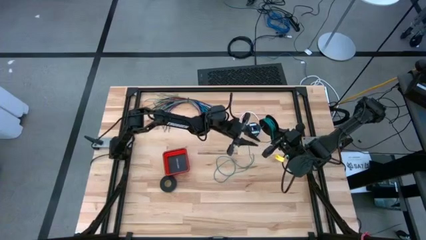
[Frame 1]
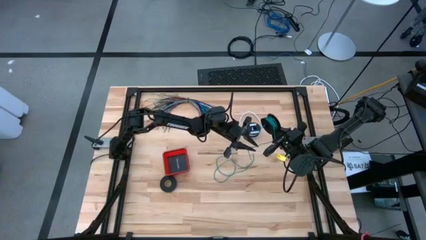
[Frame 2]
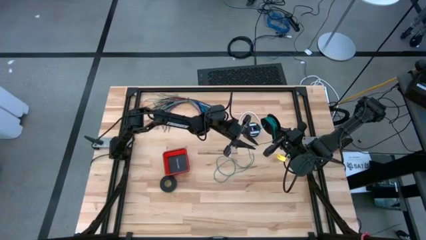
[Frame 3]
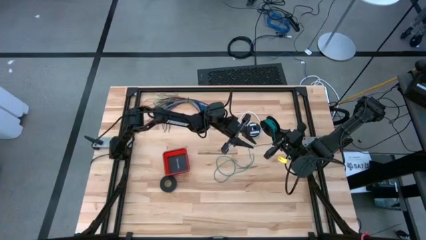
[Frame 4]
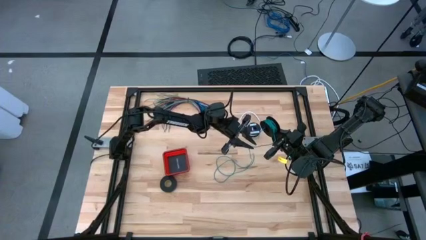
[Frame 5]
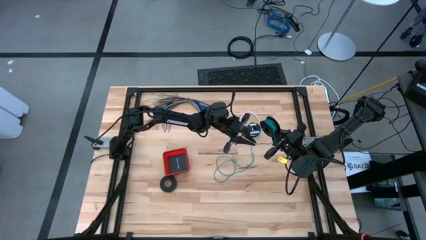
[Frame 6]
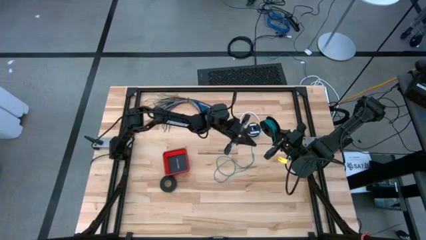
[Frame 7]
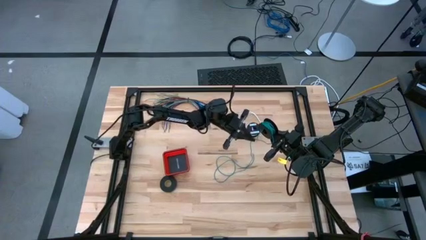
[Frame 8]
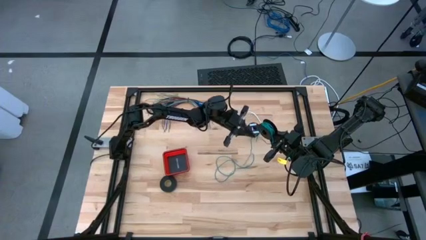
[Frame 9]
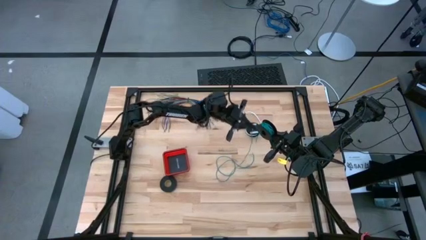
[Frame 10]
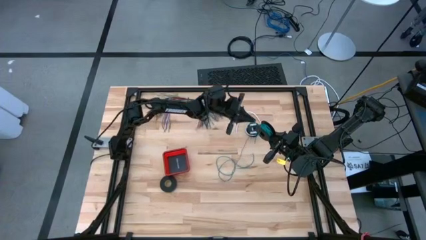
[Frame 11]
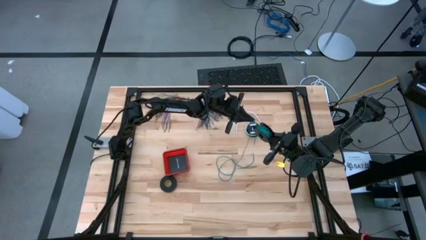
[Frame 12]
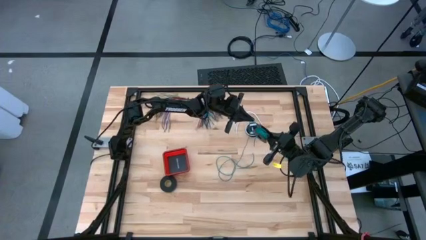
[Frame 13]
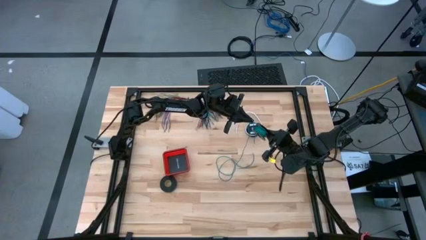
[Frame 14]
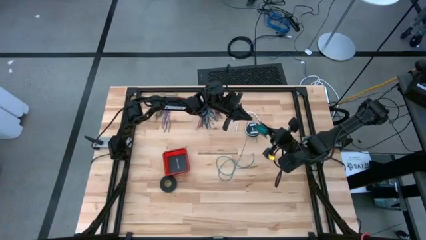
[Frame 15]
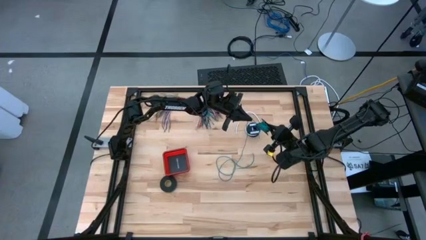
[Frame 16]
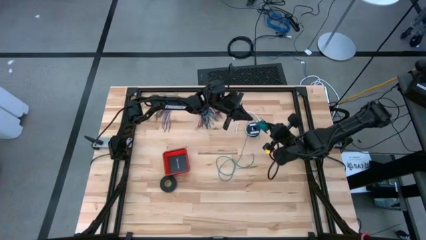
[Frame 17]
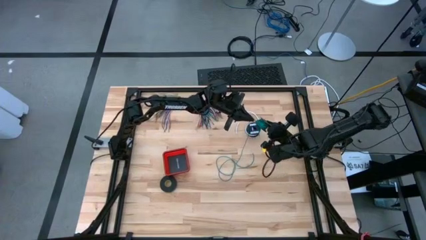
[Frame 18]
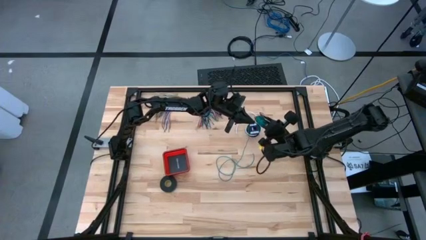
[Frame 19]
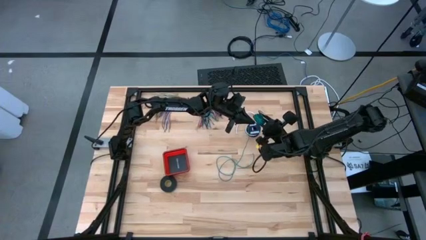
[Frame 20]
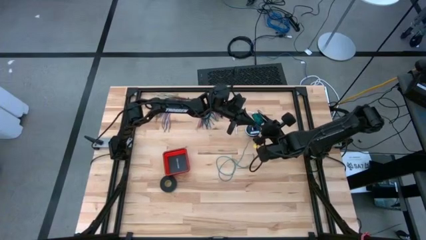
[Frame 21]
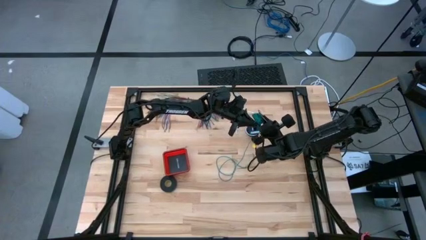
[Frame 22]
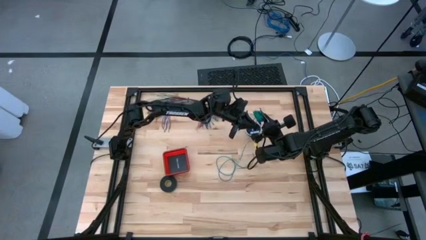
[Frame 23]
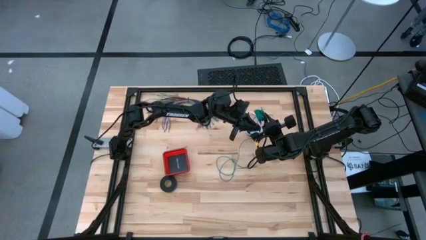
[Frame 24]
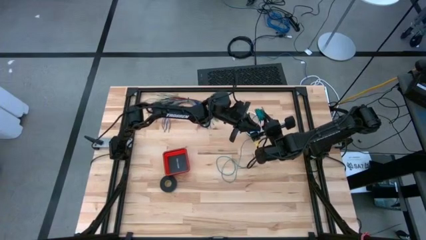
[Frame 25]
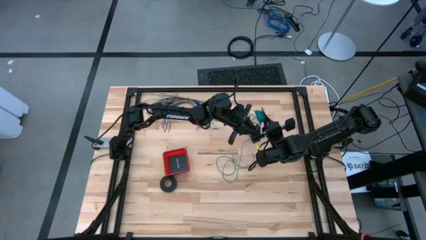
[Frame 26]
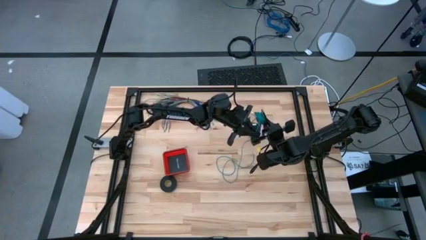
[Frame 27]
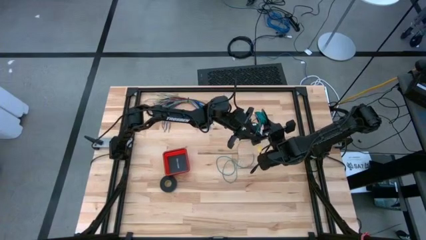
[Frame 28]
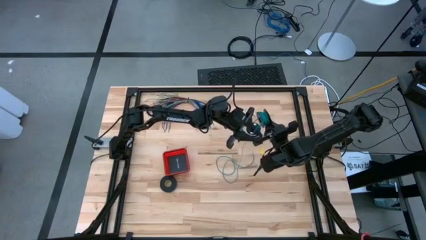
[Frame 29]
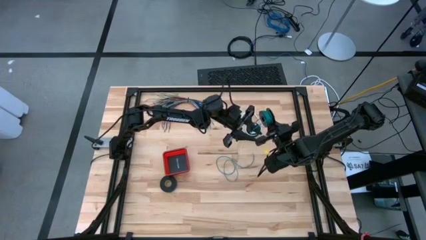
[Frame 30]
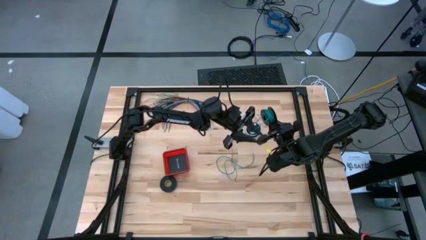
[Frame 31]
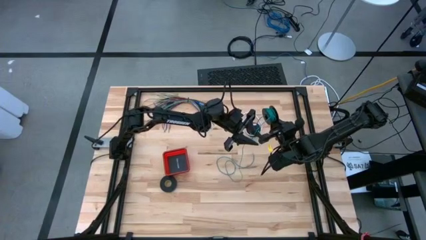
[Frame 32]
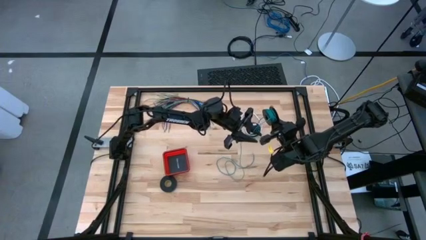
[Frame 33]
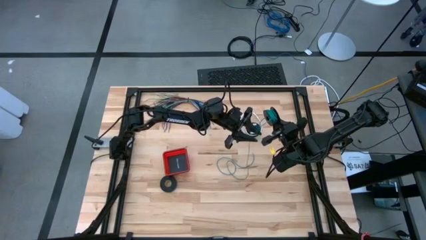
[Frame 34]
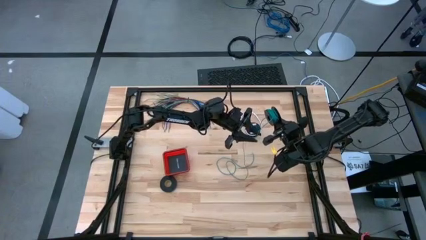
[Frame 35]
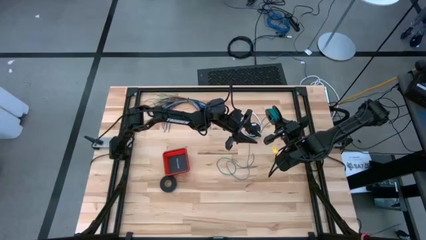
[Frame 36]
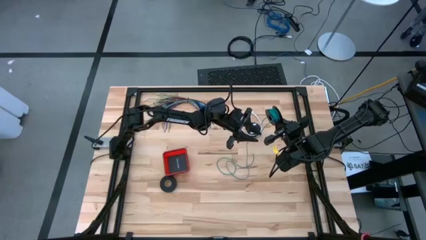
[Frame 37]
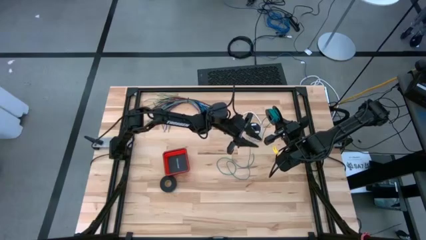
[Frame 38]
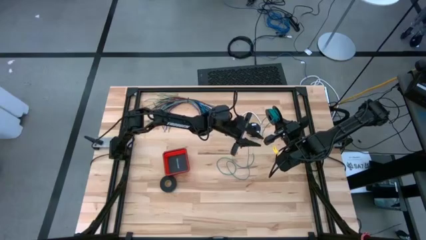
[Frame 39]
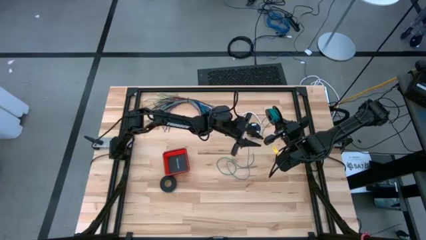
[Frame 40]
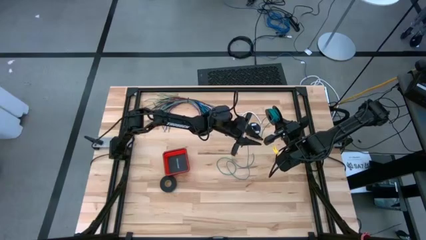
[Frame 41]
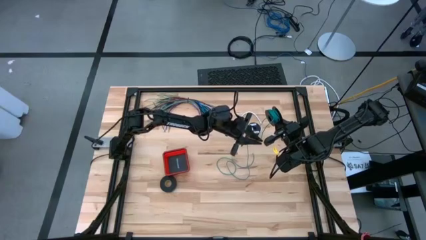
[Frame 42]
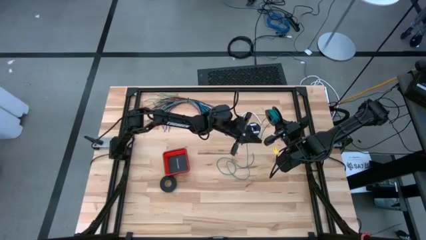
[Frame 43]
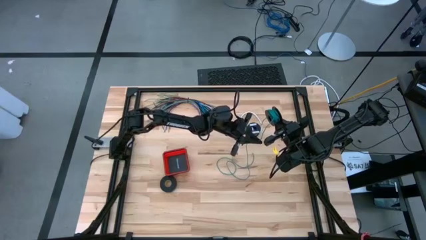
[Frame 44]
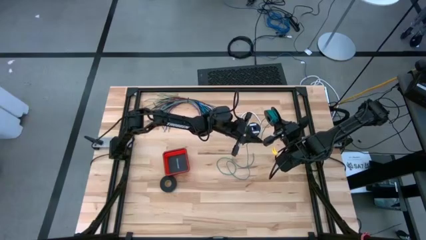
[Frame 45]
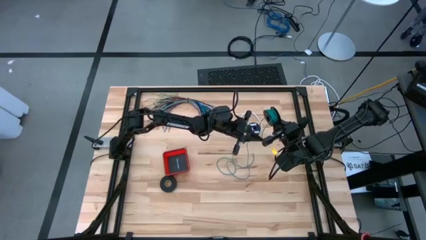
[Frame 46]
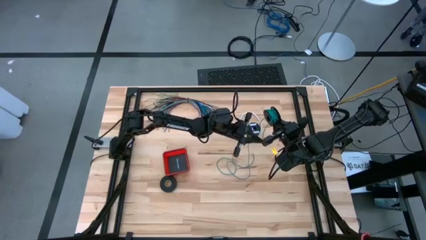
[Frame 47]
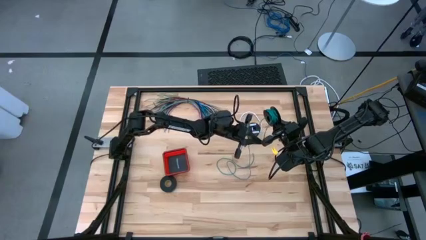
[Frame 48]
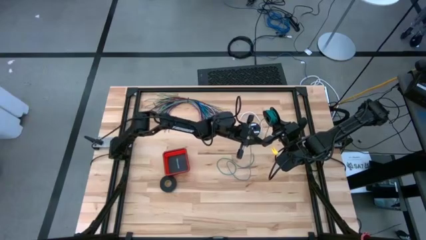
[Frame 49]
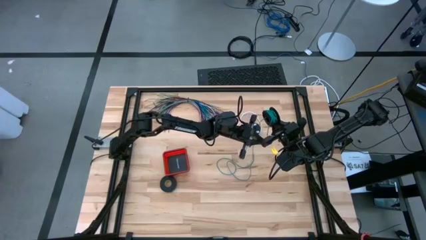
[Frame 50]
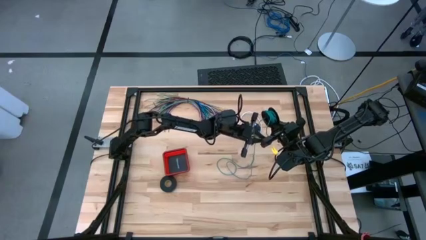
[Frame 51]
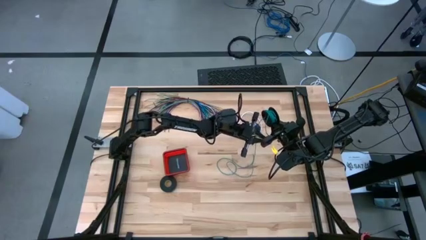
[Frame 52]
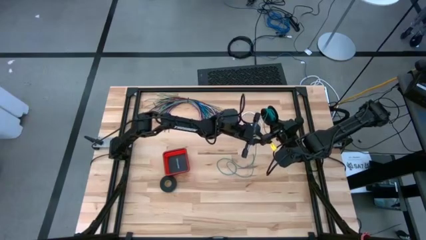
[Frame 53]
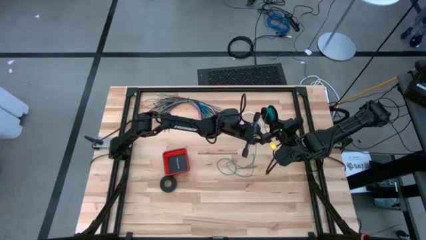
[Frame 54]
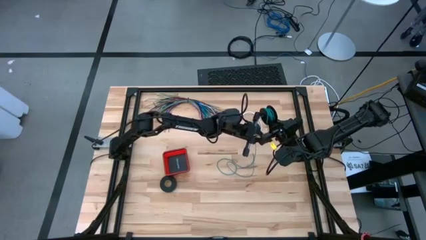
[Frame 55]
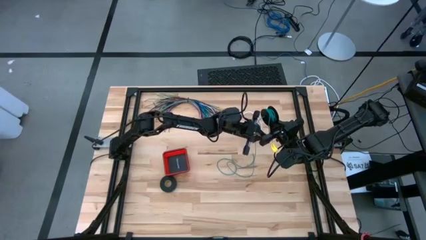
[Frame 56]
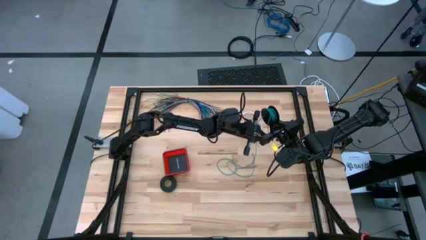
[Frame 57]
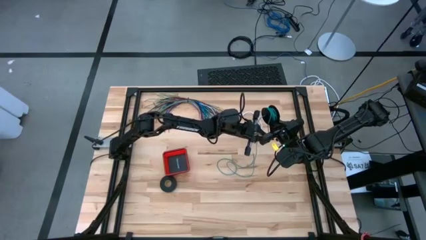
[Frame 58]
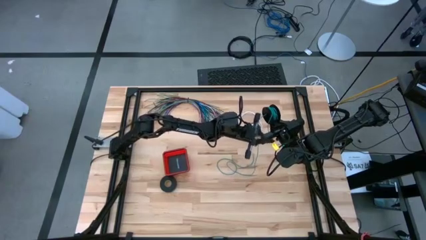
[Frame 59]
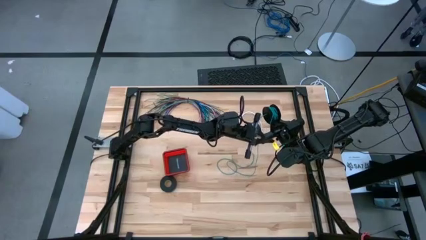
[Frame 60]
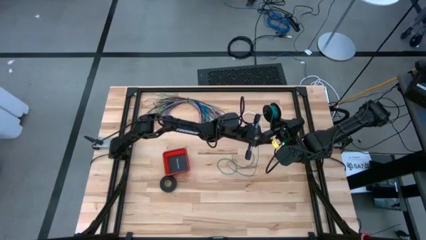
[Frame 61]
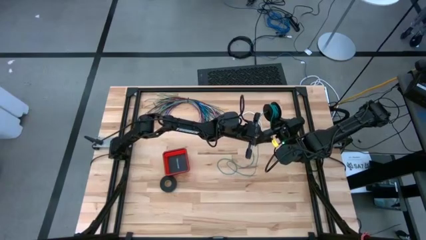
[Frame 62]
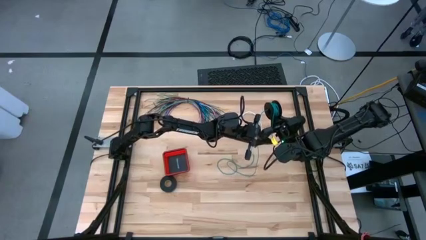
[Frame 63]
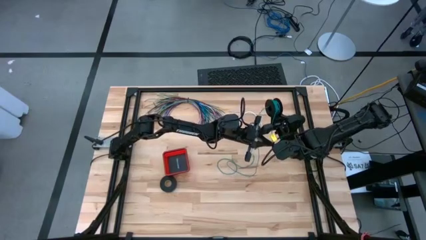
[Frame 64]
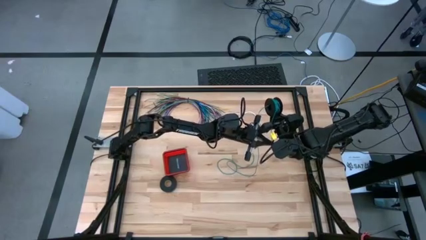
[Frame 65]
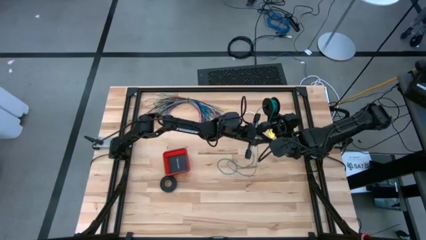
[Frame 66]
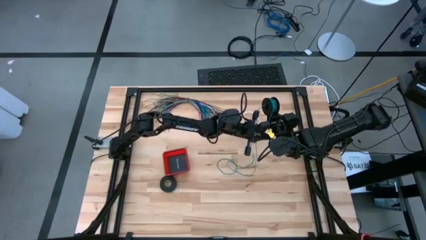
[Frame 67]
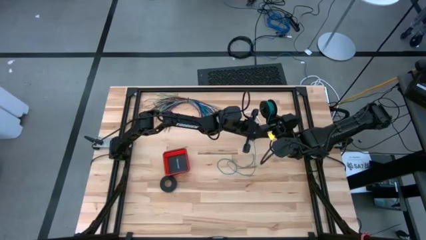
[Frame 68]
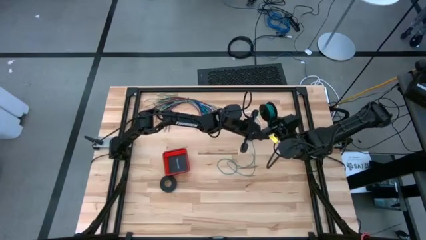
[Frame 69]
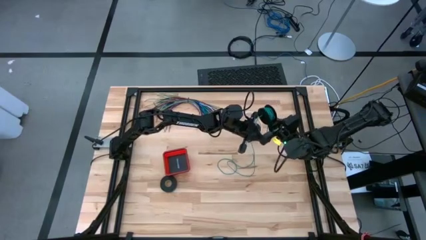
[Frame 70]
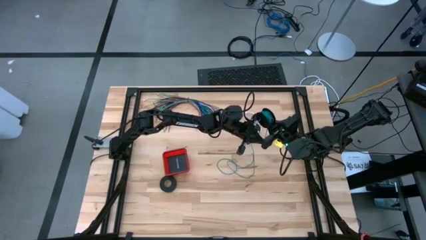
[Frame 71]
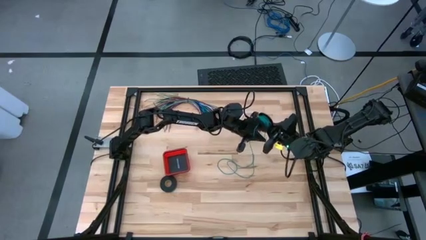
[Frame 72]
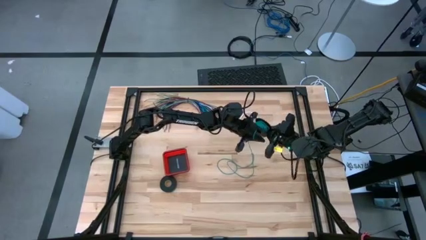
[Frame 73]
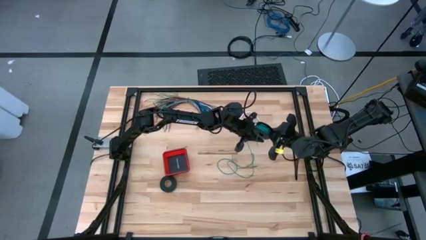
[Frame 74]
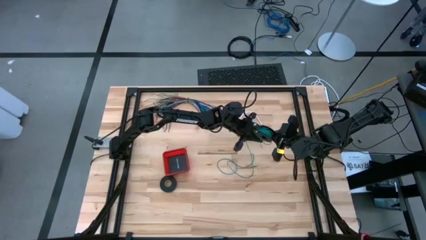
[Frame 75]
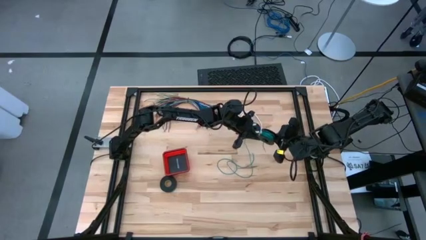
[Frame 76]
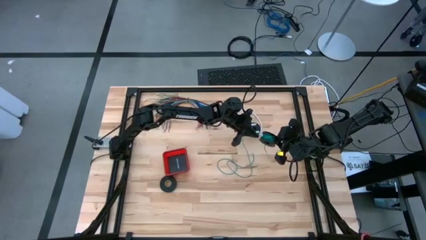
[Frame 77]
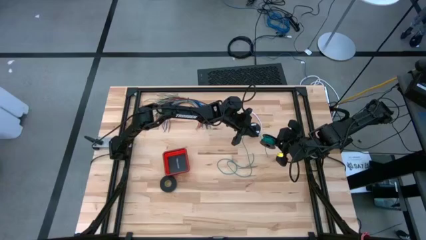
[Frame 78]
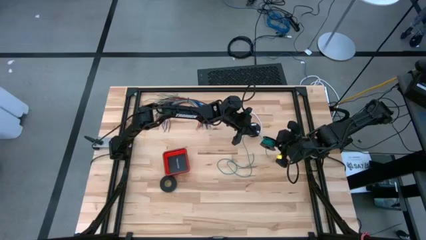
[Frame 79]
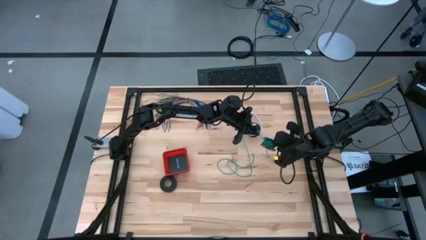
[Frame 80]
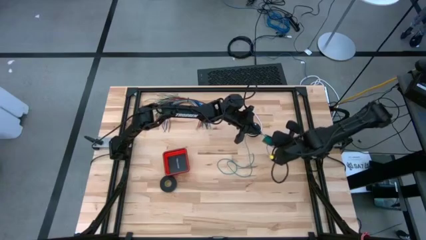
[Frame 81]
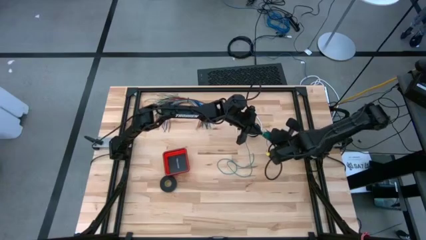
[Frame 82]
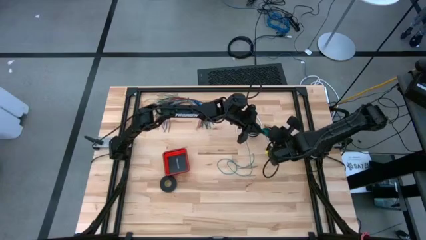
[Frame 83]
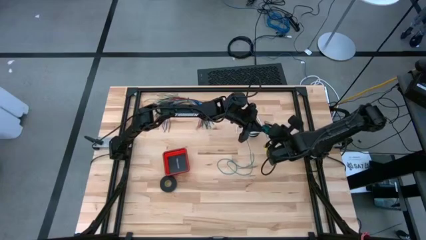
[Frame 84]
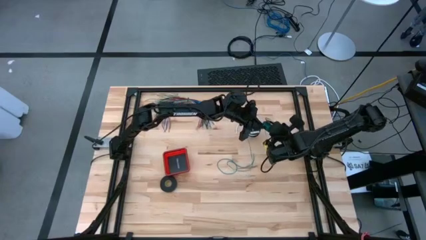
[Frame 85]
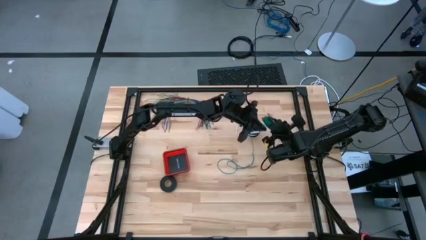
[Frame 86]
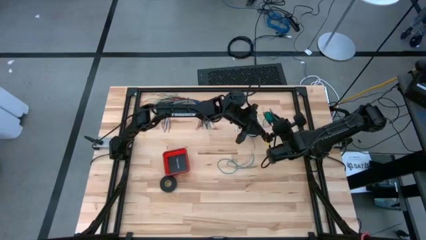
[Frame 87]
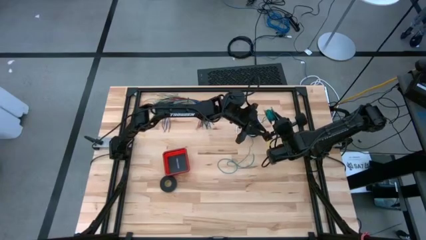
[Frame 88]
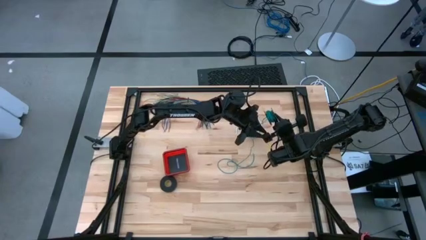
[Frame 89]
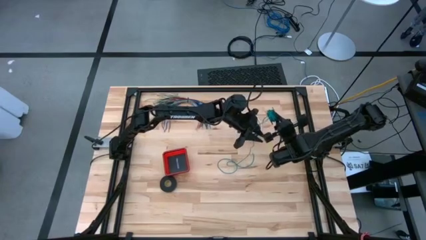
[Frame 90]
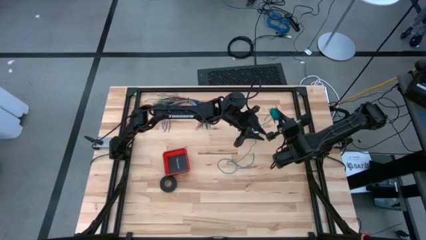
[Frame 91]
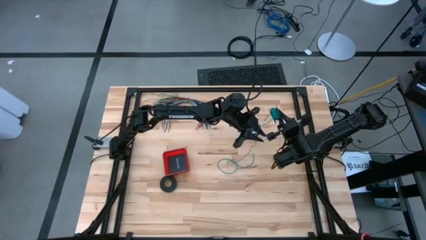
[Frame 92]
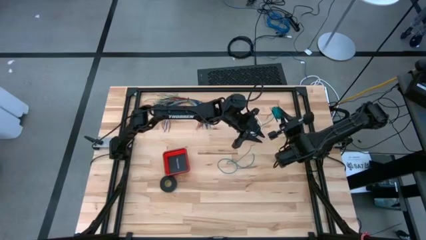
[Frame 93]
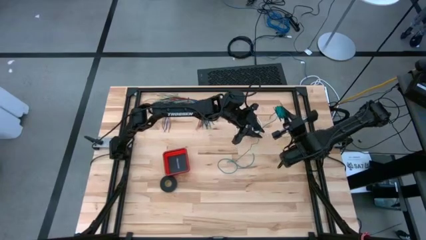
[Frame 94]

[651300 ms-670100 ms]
Task: Coil cords
Coil the green wire onto the spool
